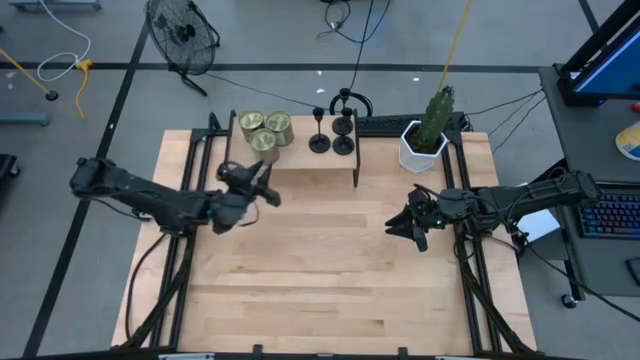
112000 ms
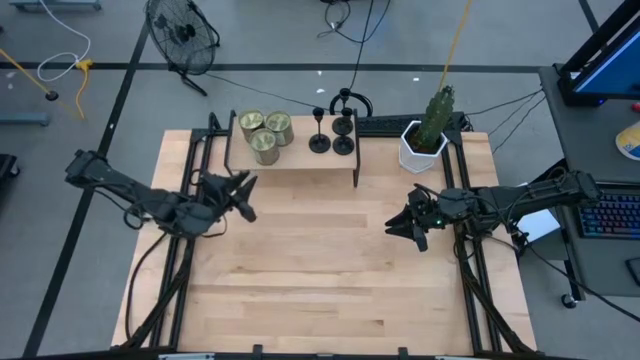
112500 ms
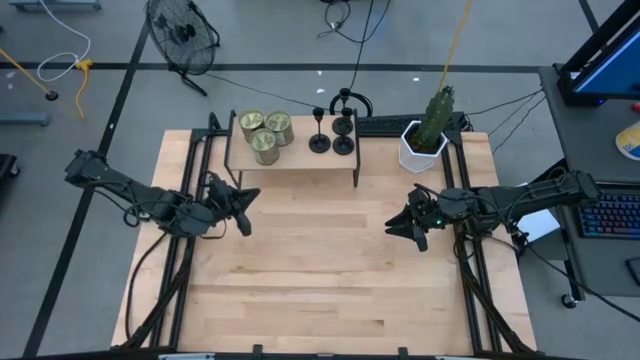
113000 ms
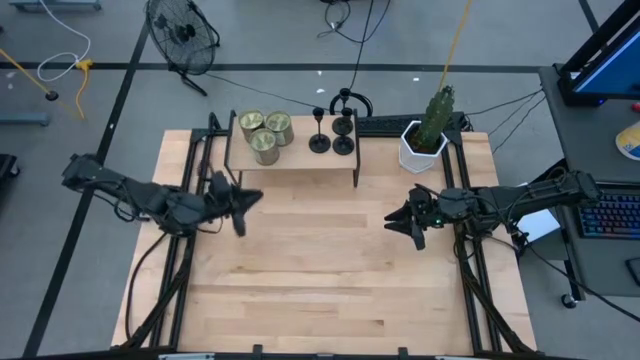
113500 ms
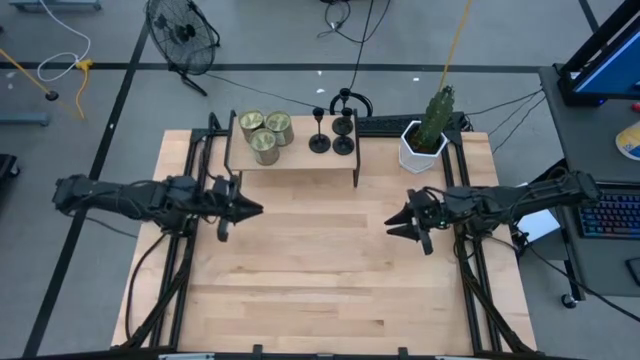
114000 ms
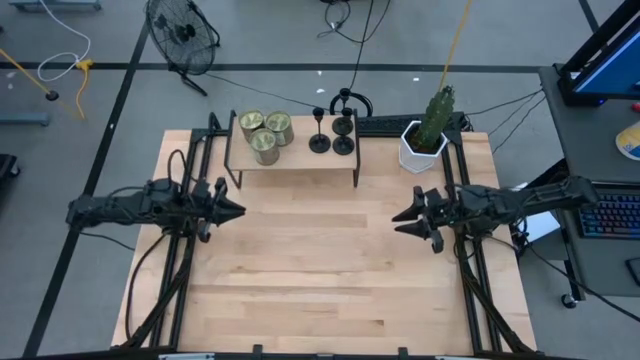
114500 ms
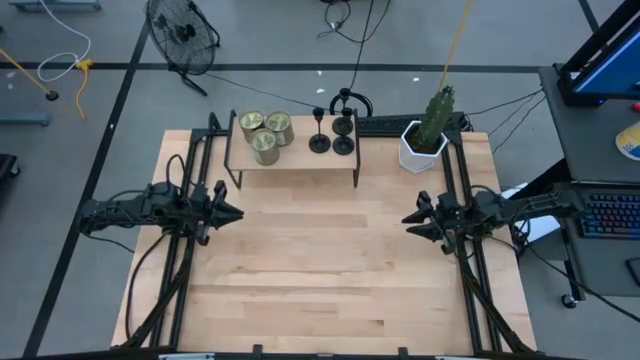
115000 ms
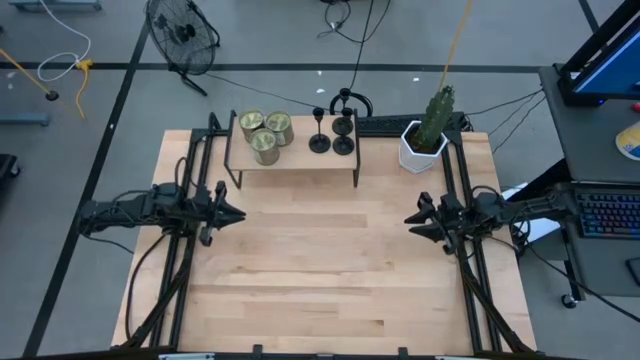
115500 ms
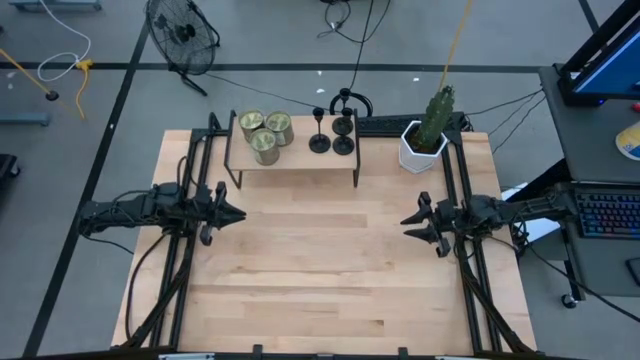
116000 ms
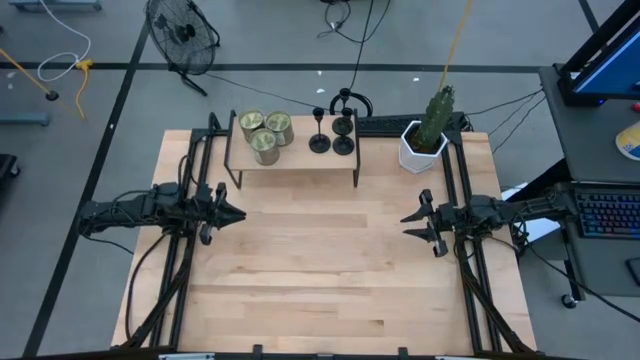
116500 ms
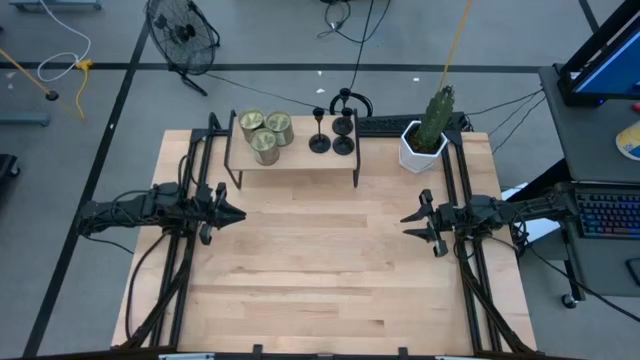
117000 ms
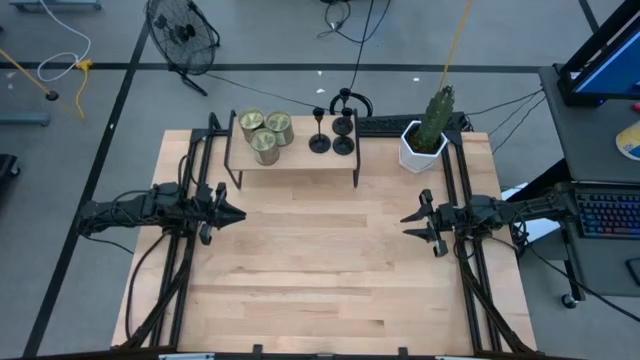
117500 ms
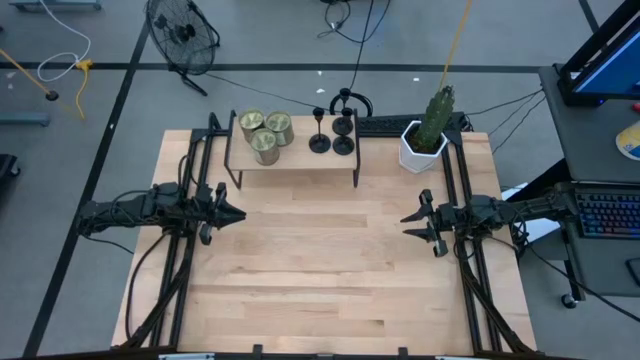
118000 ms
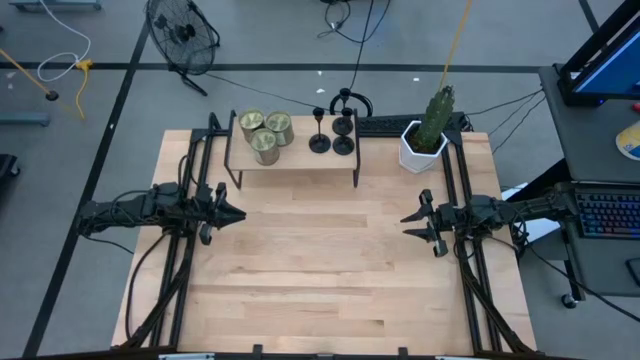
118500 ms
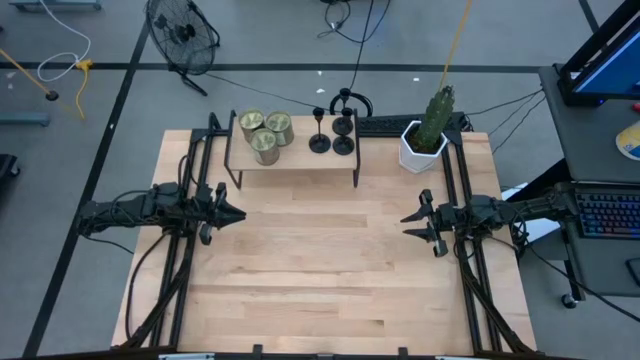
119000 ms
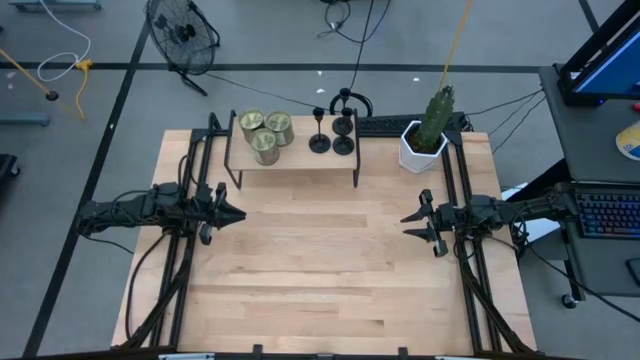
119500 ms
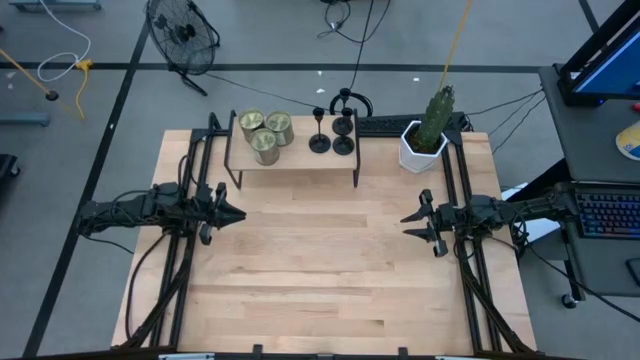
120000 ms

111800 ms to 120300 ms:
Task: Pick & Place candle stick holders
Return to Home Position

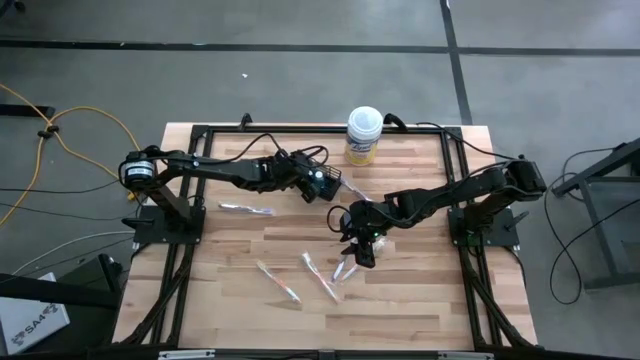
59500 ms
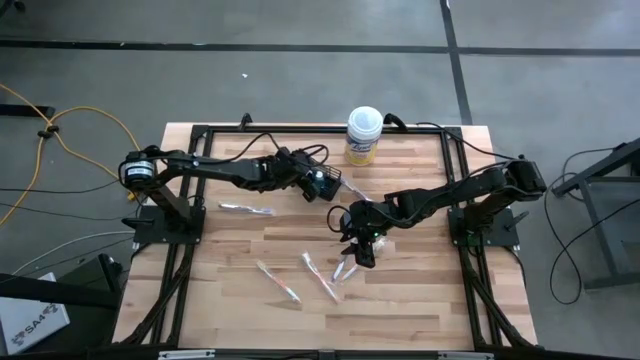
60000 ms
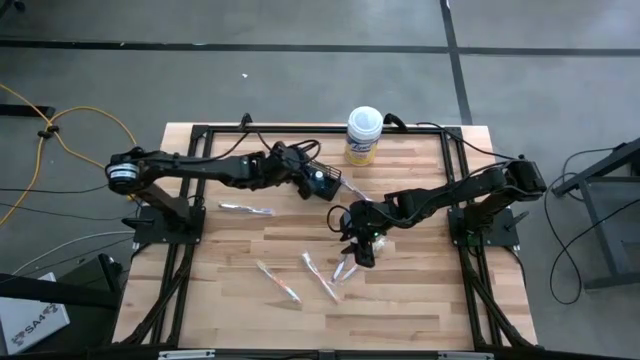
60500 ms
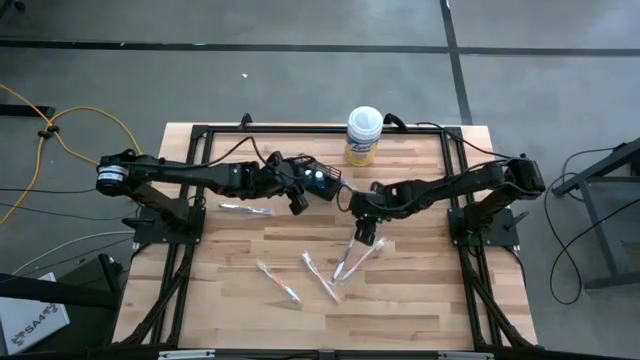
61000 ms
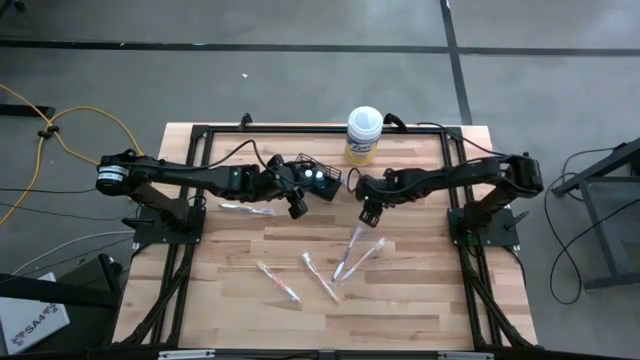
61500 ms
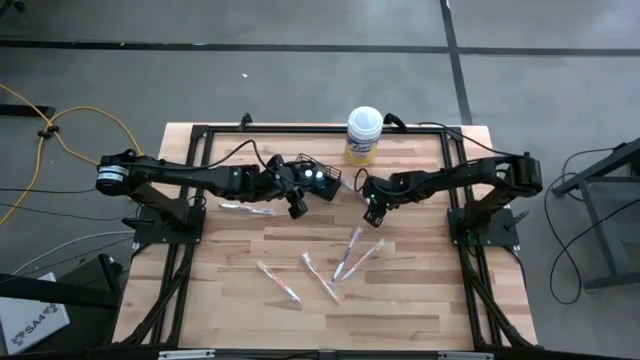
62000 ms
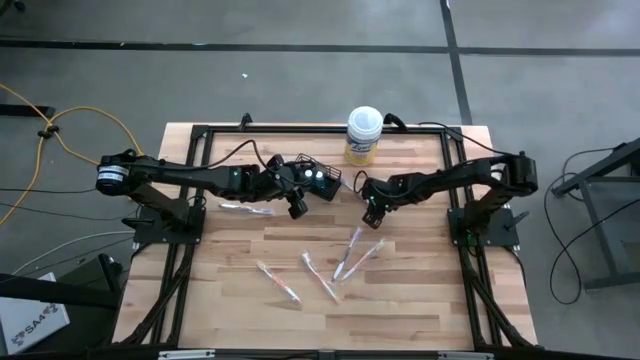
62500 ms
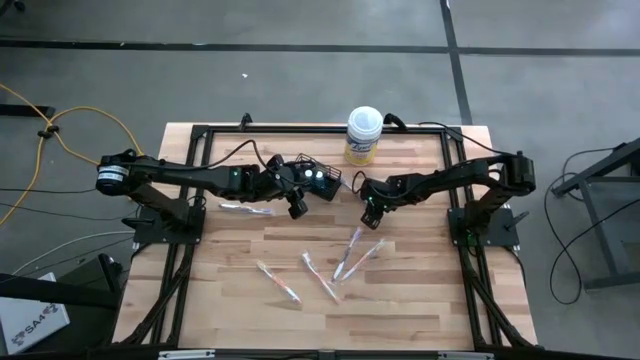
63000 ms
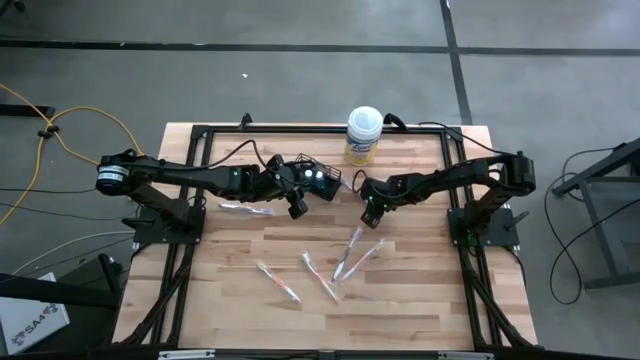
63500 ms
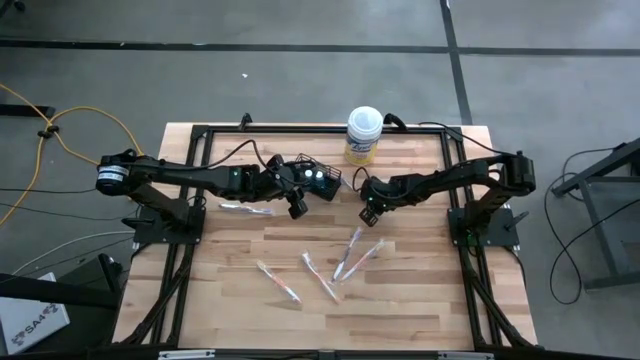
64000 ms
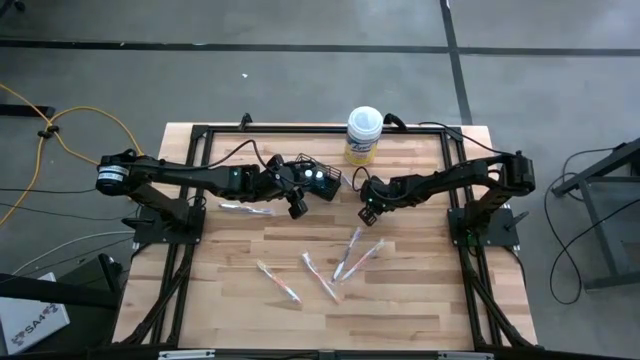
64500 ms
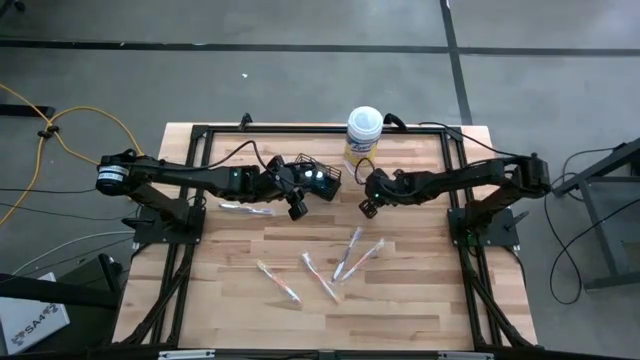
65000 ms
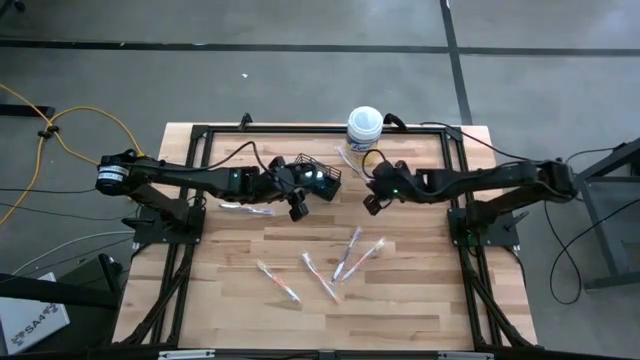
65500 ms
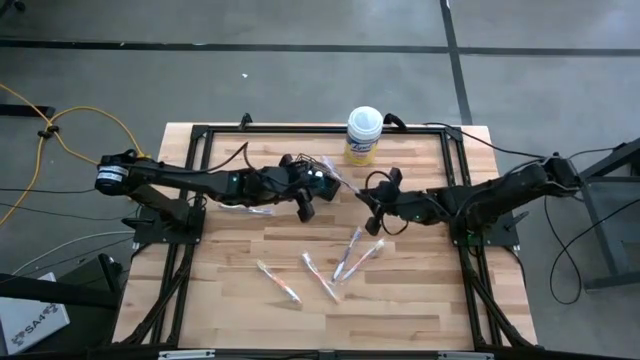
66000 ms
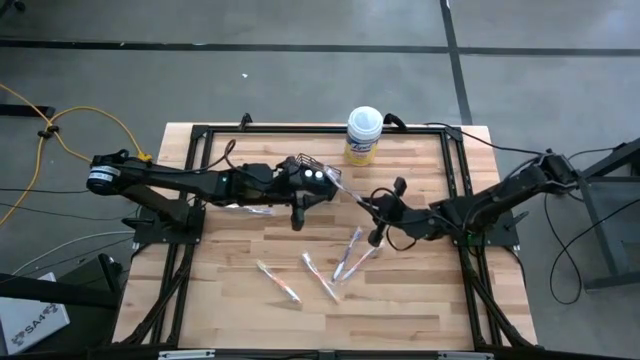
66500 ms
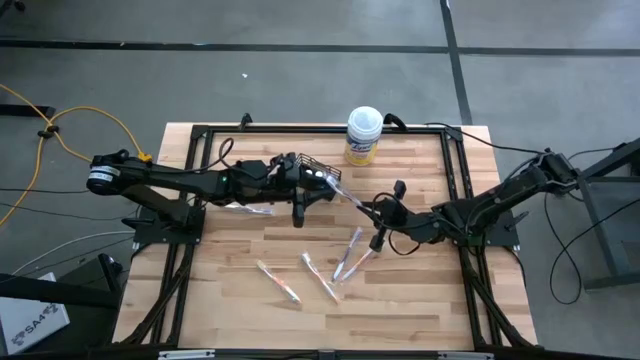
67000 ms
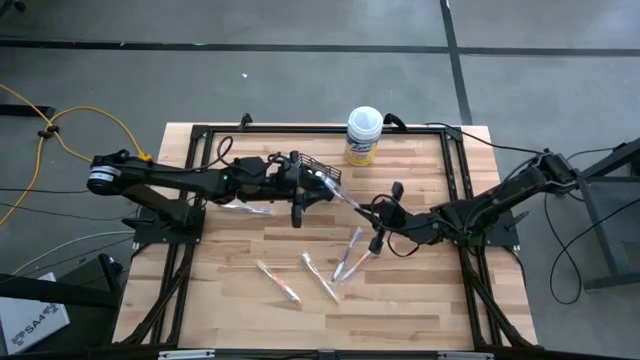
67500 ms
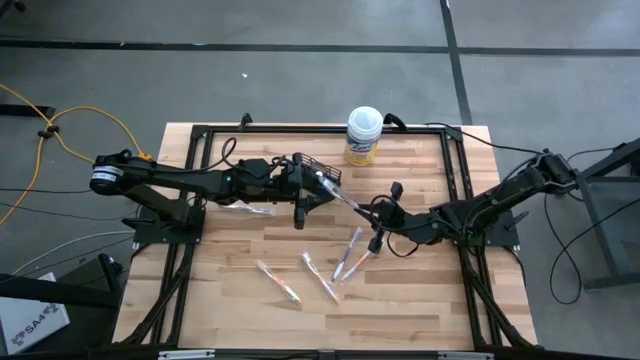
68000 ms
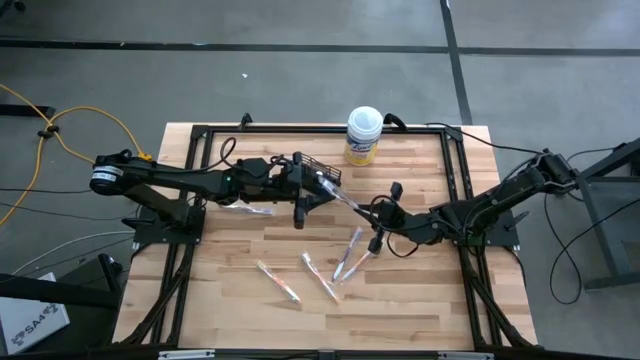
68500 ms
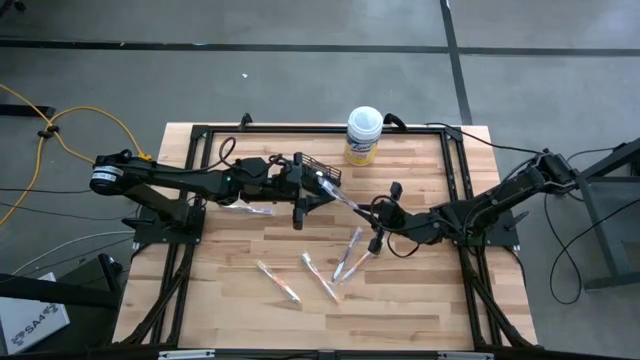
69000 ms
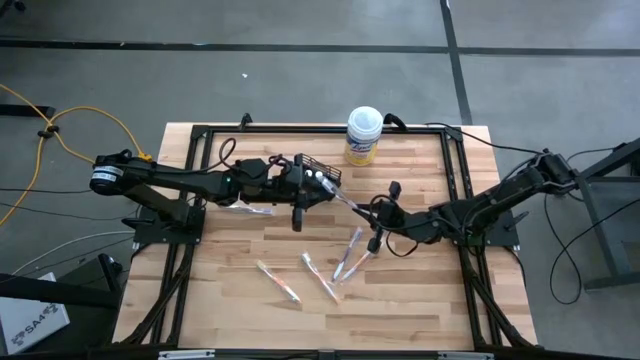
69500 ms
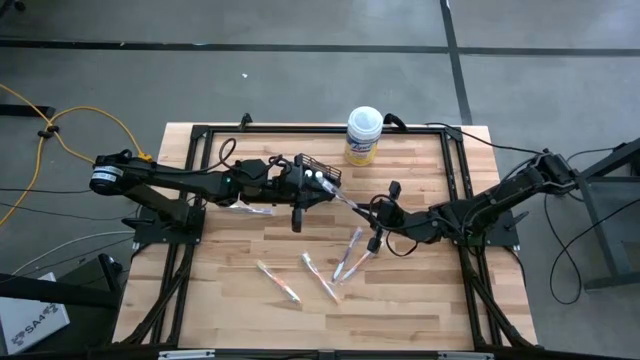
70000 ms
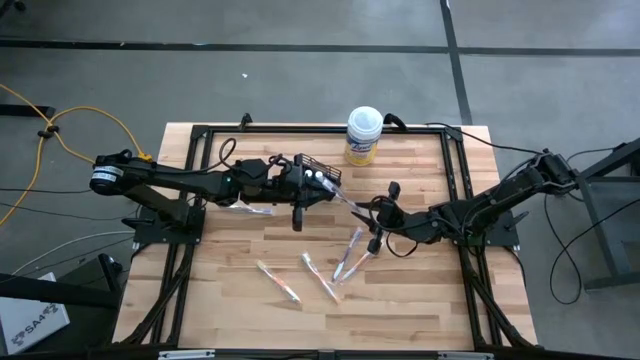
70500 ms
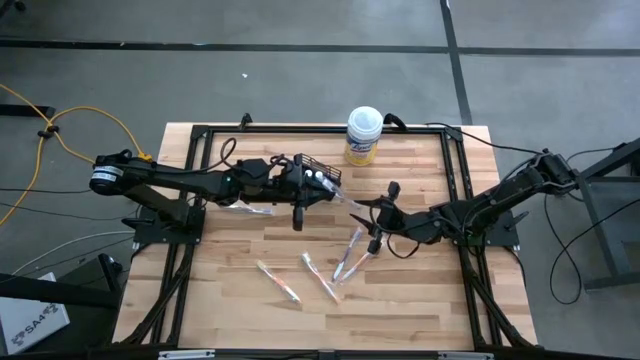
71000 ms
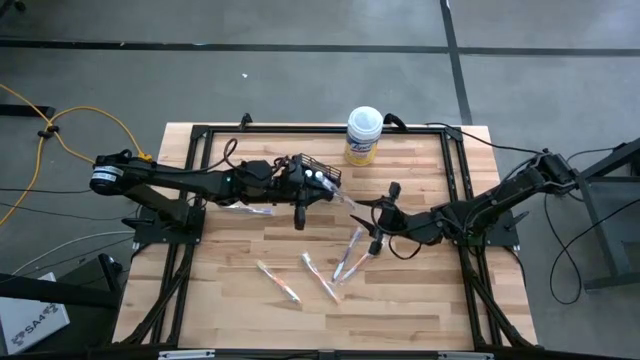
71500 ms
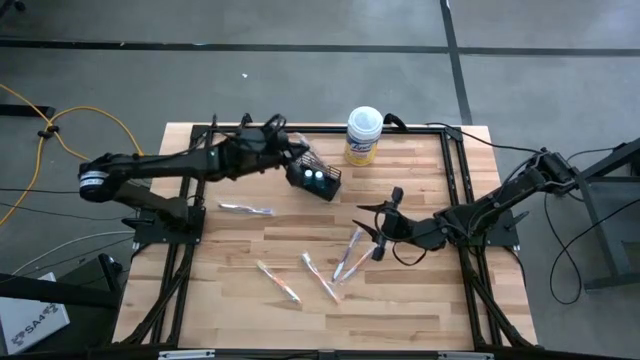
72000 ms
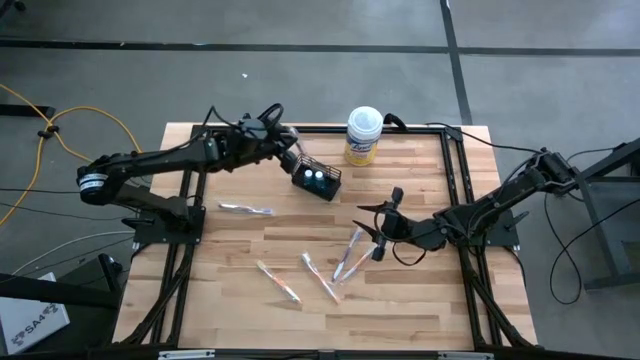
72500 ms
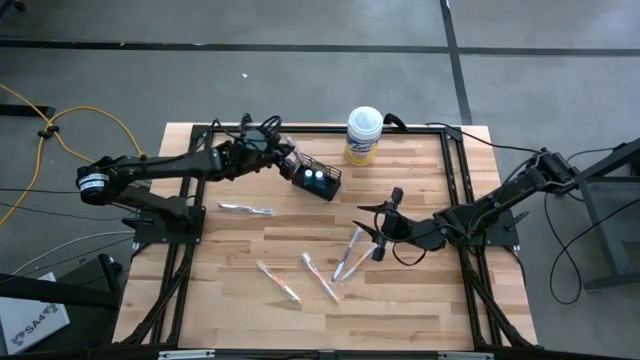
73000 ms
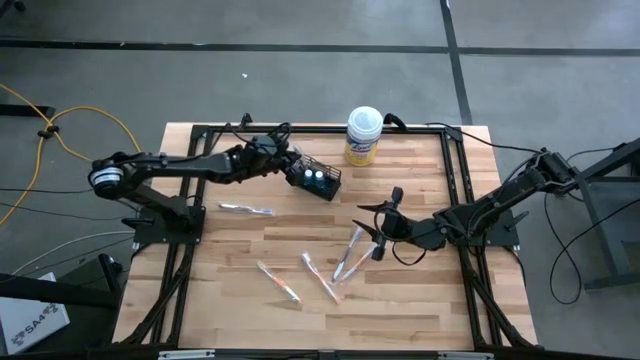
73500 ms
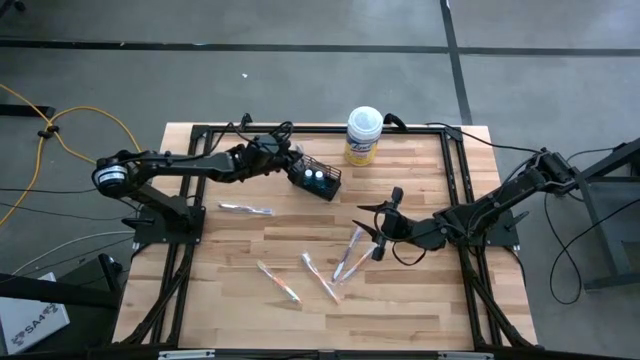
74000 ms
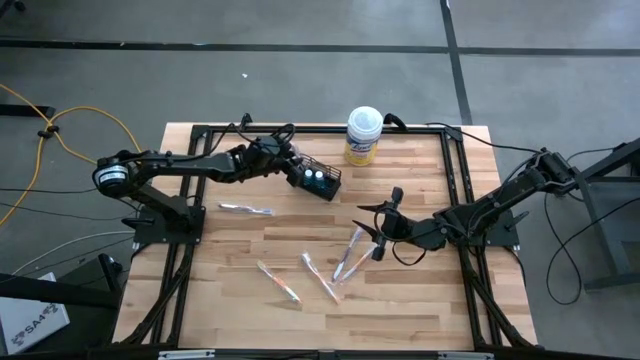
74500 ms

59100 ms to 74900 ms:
Task: Pick & Place toothbrushing station
Put the top right violet toothbrush into the black mesh organizer
